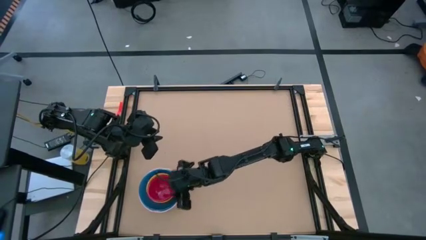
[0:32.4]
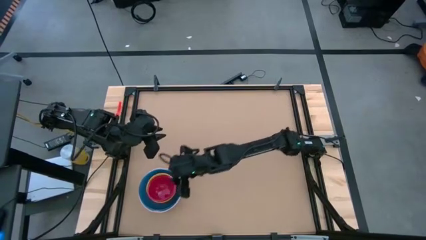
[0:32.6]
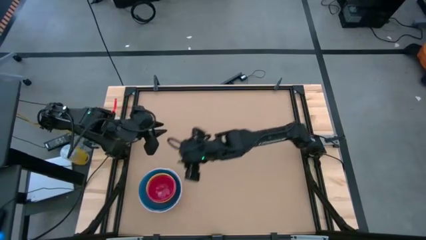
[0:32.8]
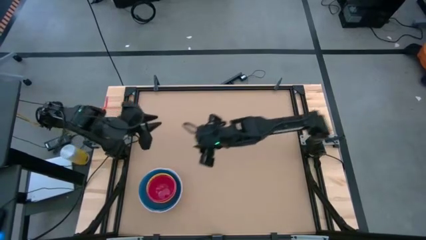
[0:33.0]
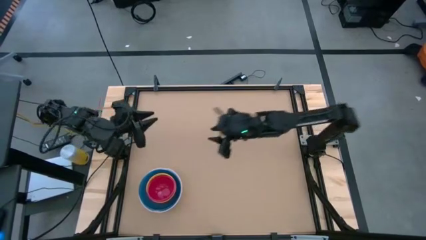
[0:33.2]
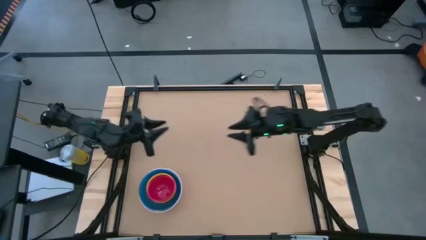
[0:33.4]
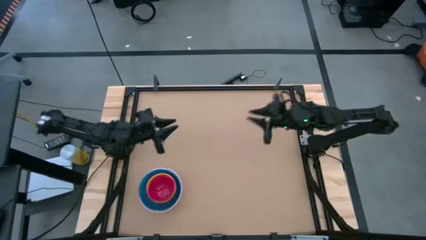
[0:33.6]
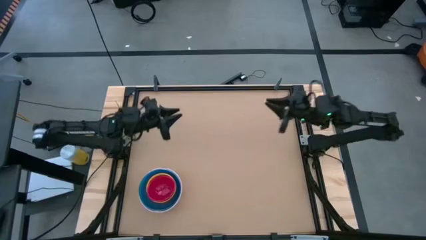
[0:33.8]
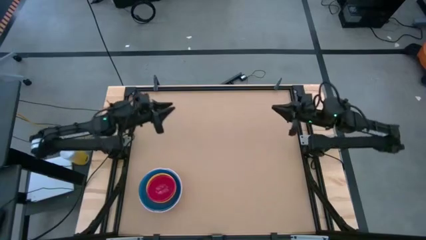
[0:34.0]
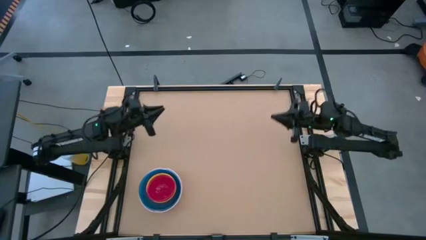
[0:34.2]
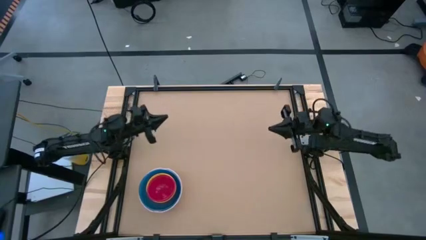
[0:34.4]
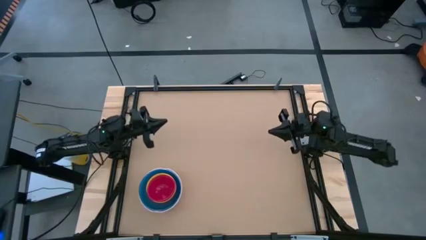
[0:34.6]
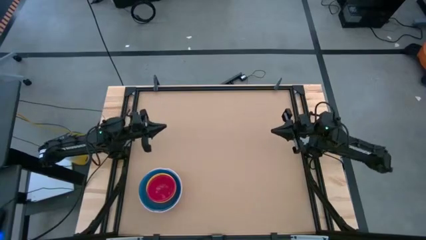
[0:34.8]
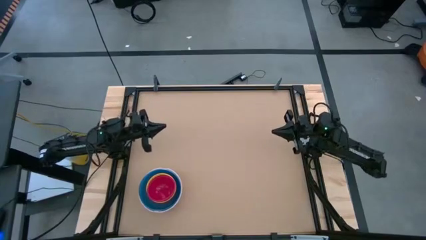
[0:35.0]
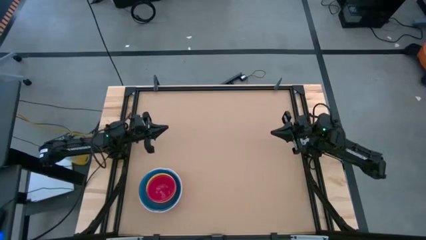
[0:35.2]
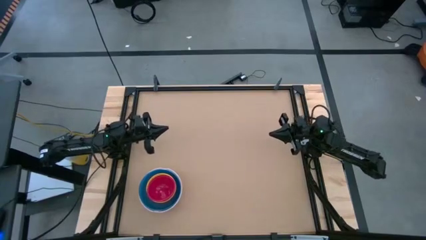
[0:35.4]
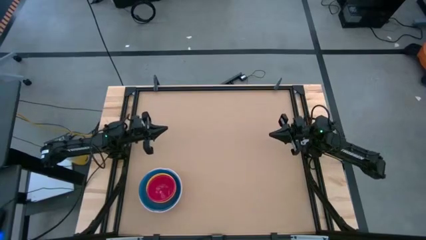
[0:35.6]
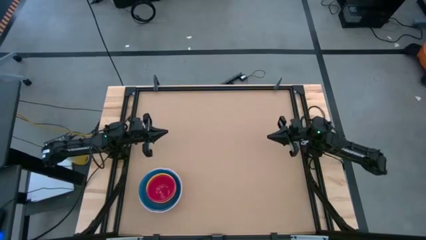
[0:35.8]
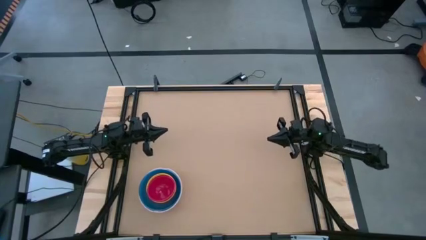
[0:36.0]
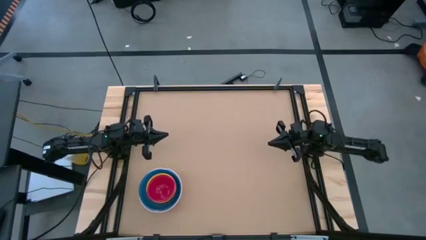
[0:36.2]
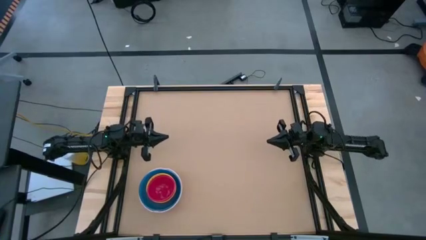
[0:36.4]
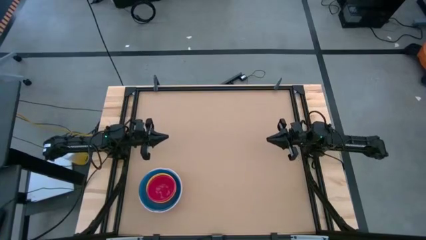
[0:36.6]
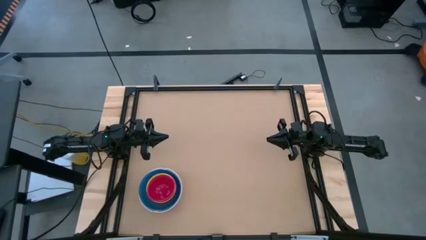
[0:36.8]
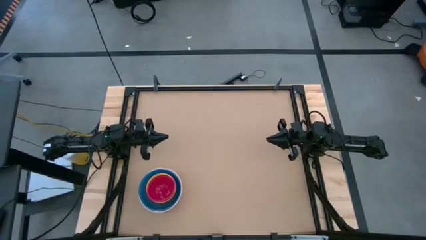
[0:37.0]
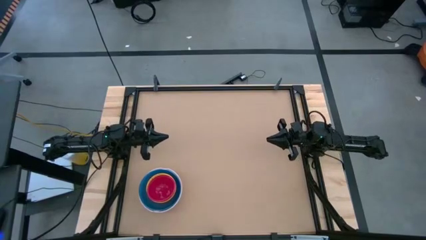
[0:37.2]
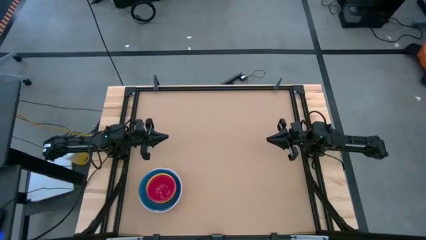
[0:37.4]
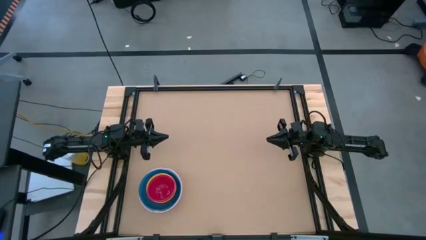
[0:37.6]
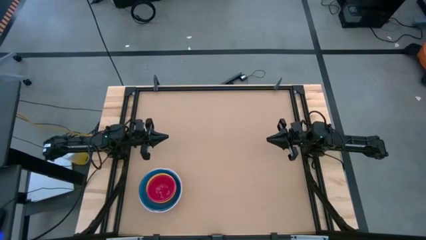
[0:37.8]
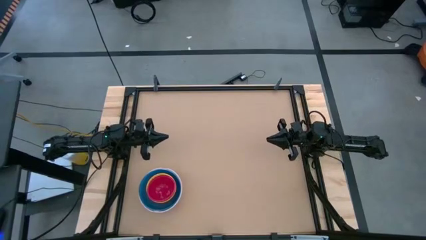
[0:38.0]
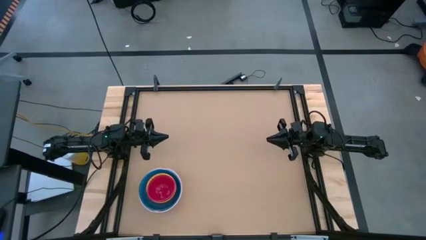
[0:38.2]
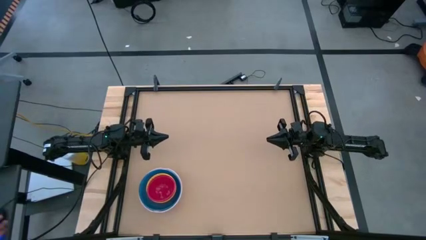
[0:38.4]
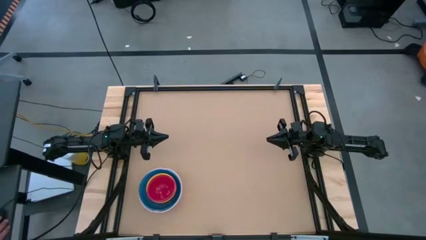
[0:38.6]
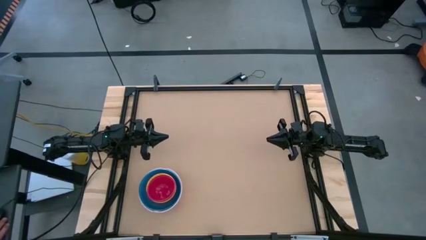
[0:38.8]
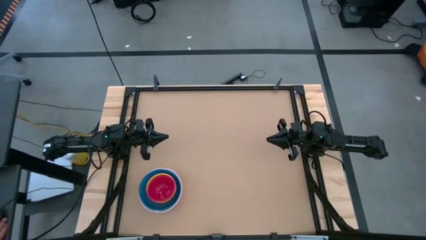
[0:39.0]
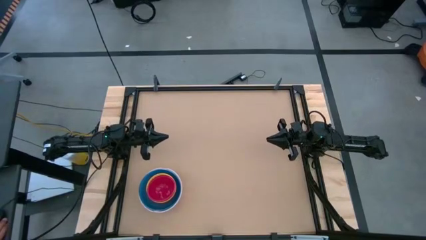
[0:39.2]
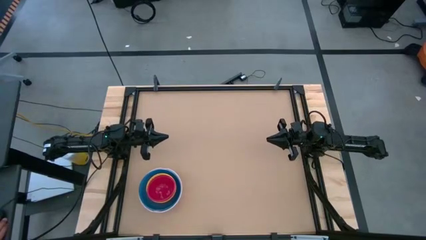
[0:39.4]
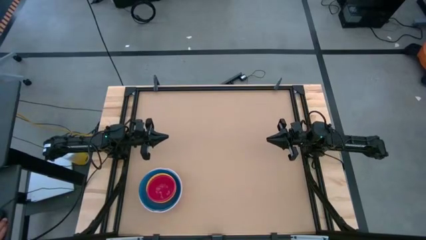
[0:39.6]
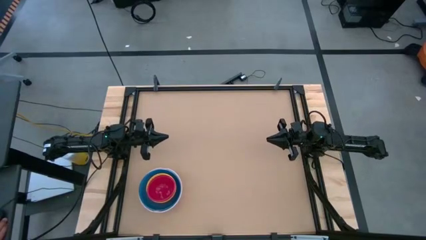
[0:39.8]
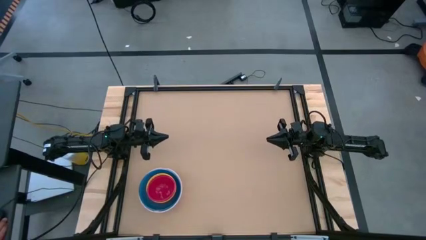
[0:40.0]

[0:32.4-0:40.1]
Return to Home Position

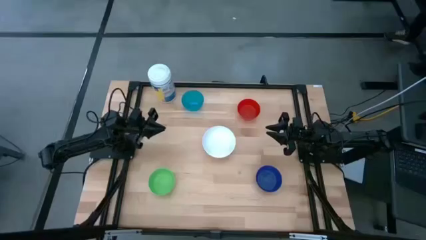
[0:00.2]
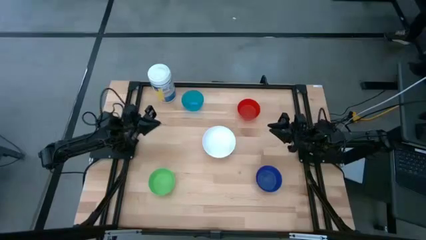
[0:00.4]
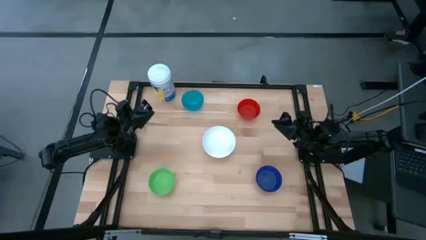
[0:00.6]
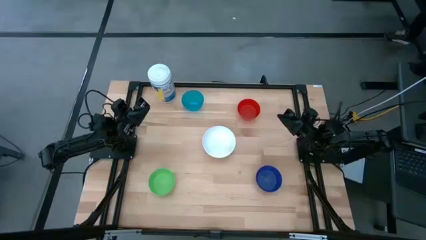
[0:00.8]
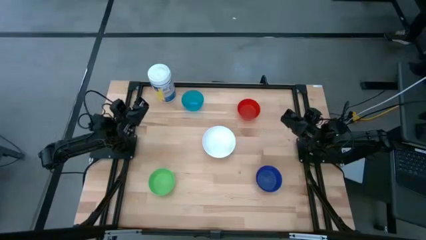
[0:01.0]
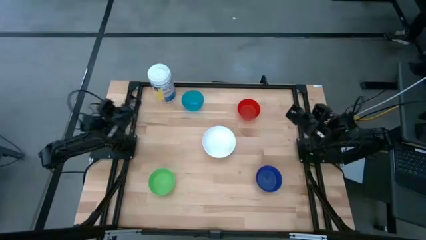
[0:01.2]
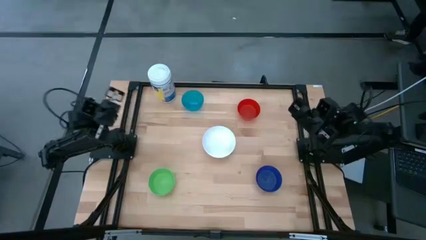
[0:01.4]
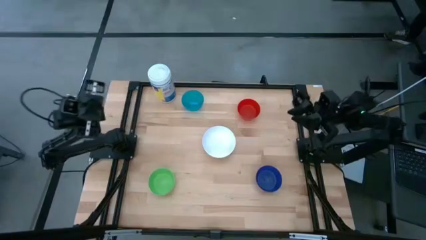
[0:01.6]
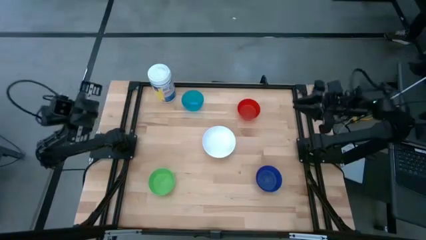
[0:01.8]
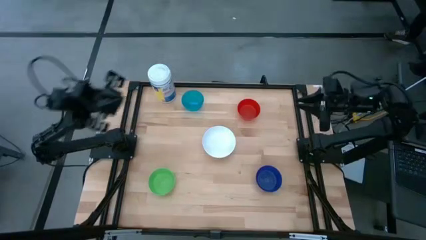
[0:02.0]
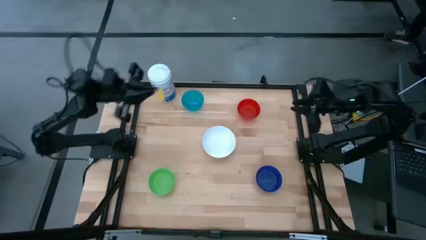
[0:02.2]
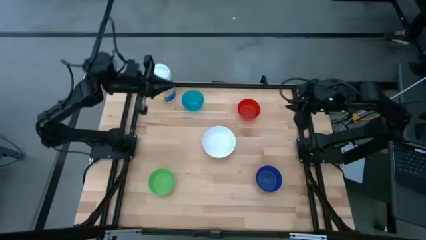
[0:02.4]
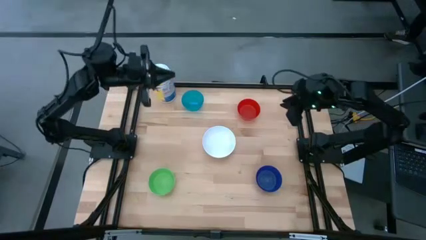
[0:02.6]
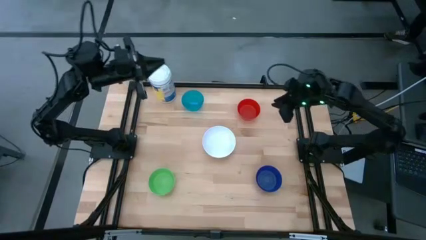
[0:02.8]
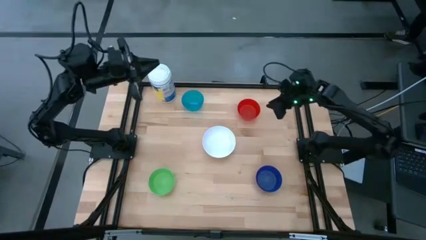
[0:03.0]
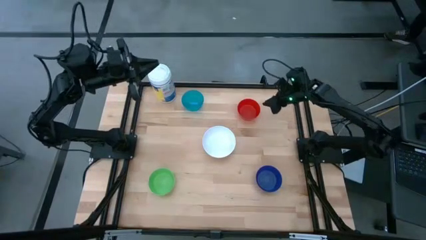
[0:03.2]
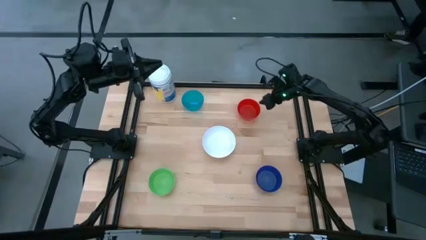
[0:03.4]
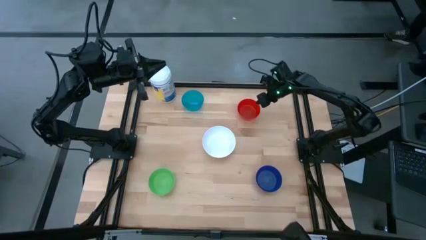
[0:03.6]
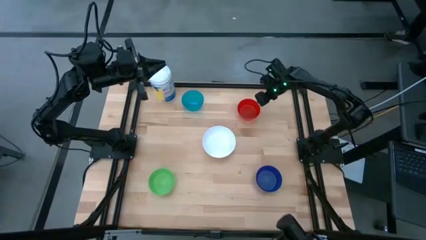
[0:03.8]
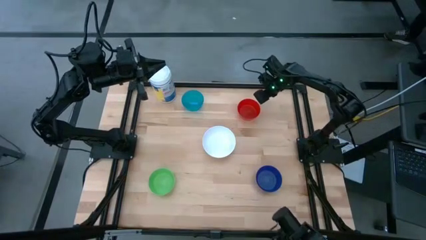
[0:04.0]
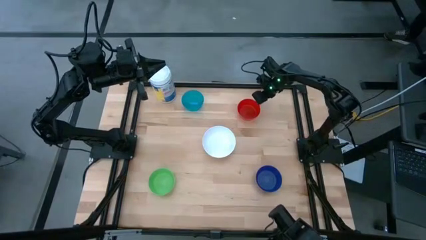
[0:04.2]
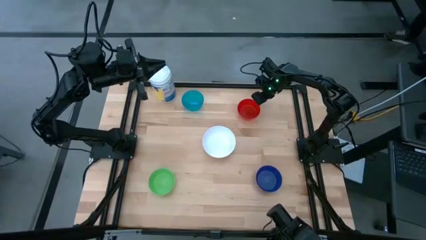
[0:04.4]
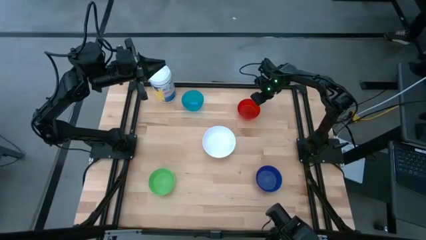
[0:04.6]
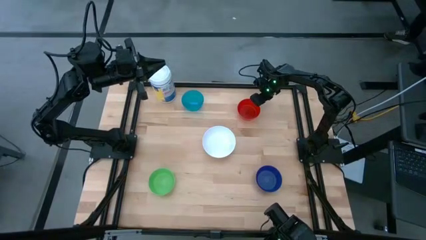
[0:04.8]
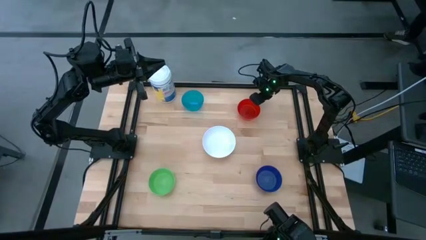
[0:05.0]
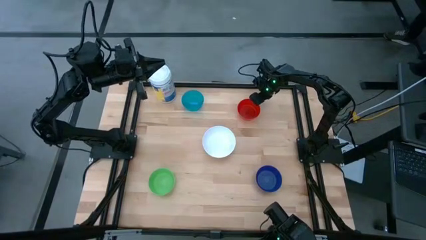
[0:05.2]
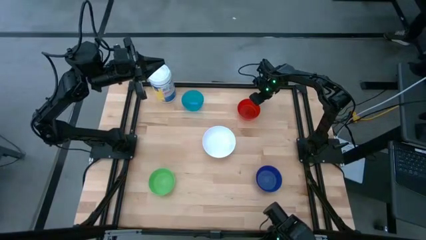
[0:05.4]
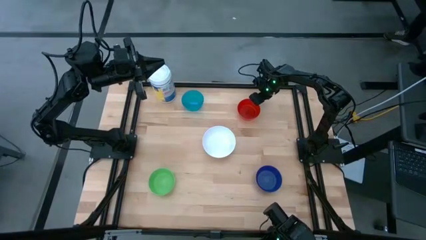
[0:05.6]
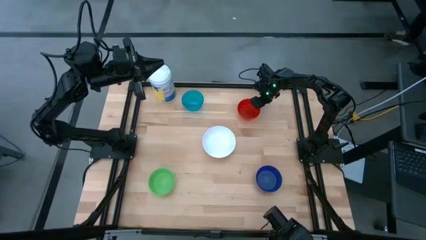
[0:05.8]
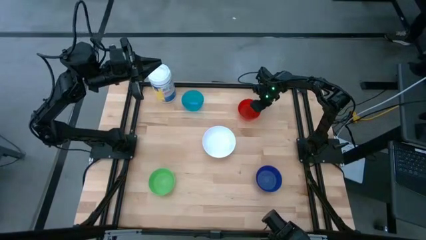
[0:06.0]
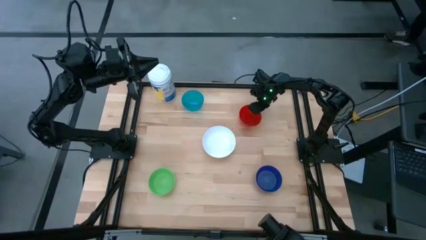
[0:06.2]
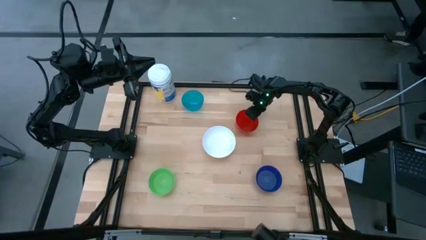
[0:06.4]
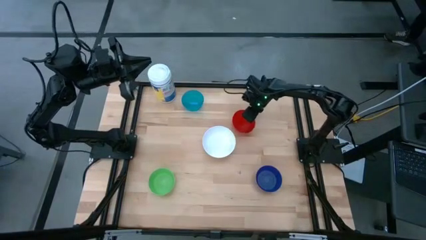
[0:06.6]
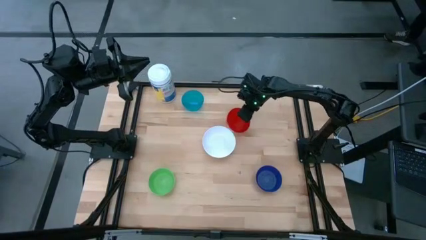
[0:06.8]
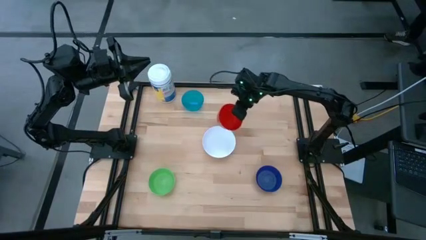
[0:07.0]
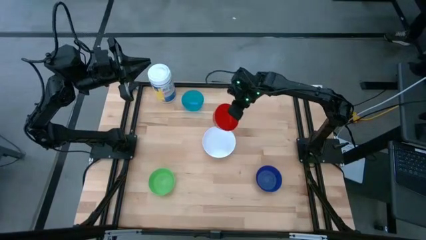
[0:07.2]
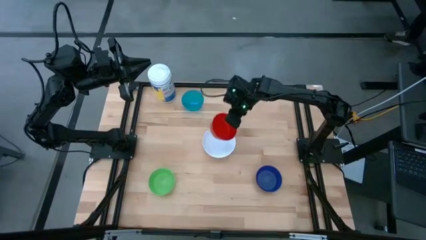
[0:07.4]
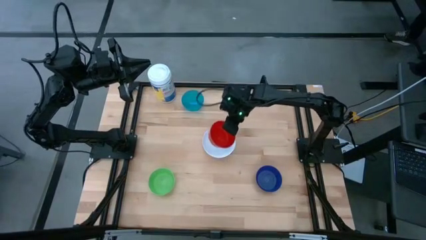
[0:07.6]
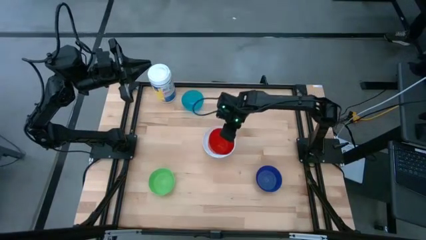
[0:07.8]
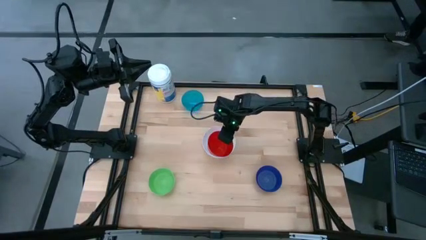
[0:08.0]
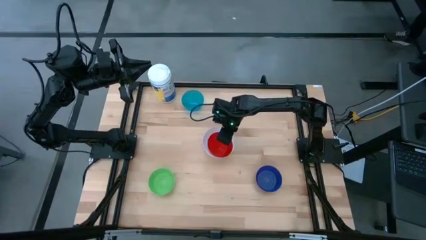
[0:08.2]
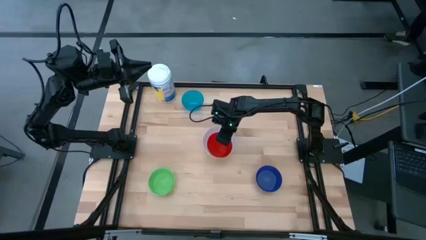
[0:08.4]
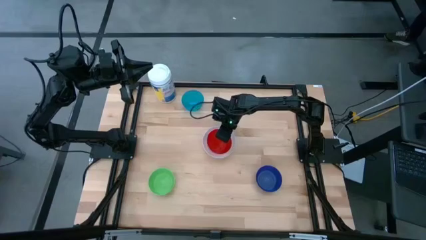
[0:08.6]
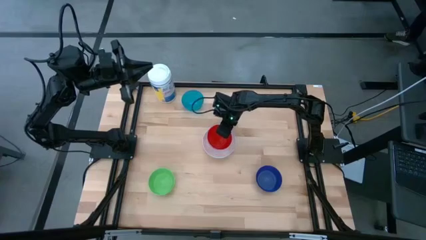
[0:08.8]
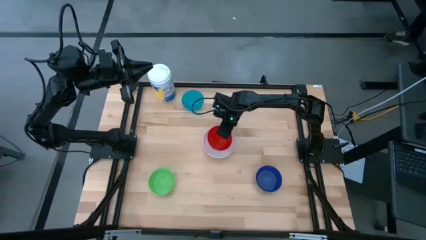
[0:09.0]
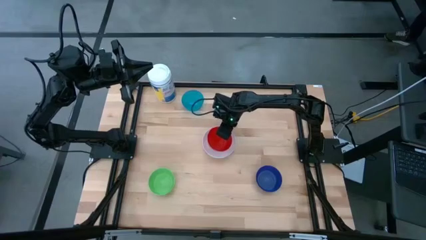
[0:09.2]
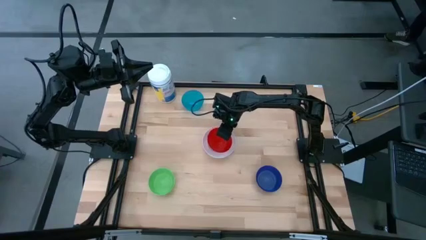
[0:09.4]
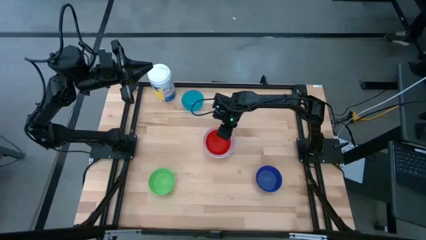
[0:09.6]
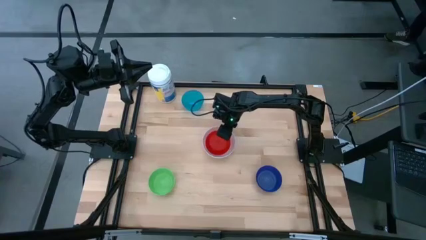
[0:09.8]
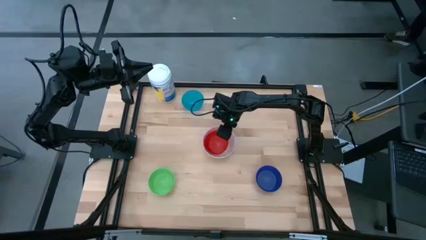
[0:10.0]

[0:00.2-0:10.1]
Stack the red bowl in the white bowl
